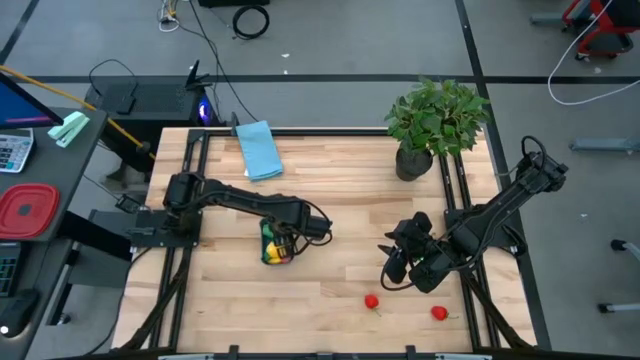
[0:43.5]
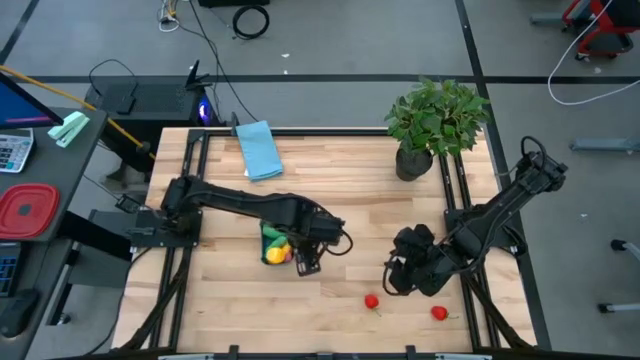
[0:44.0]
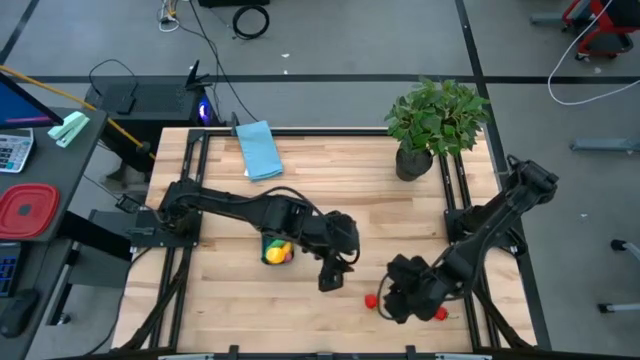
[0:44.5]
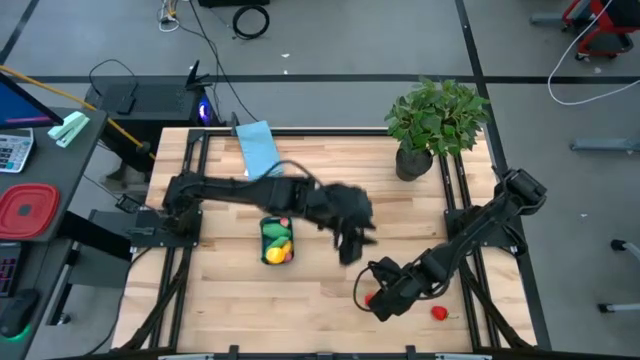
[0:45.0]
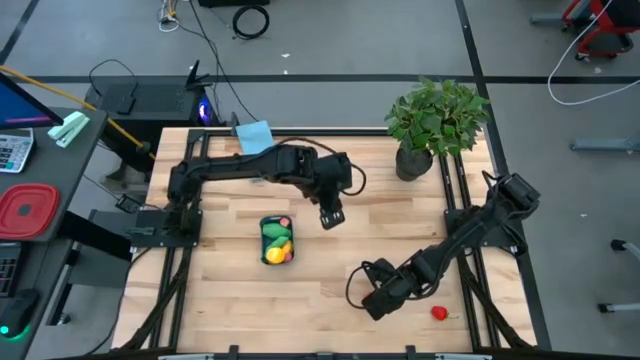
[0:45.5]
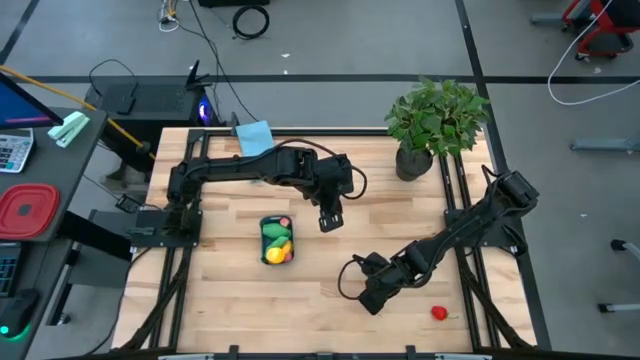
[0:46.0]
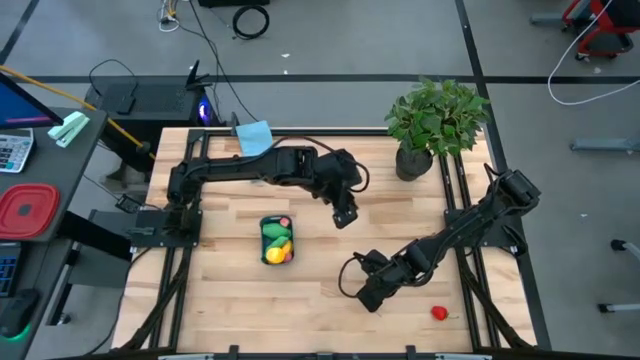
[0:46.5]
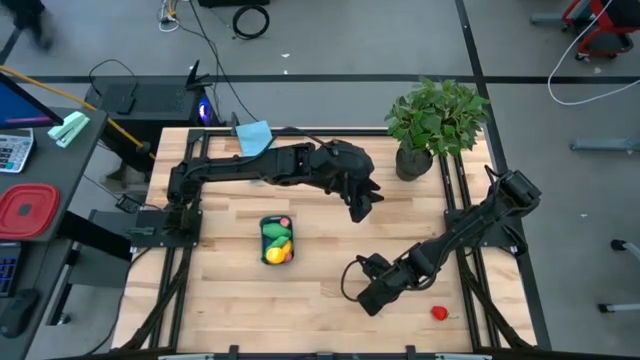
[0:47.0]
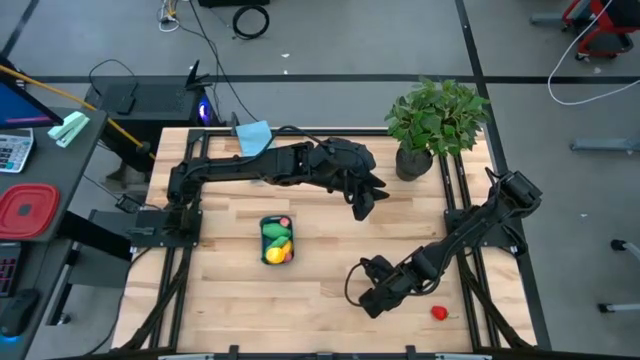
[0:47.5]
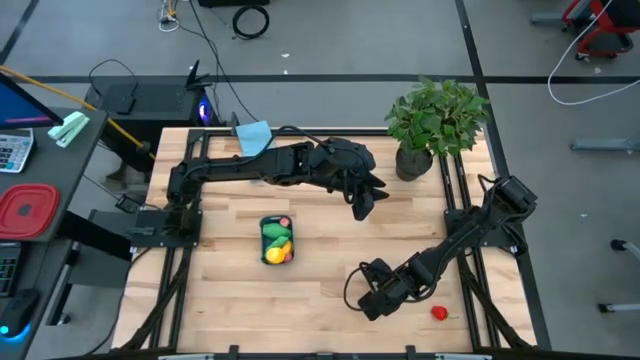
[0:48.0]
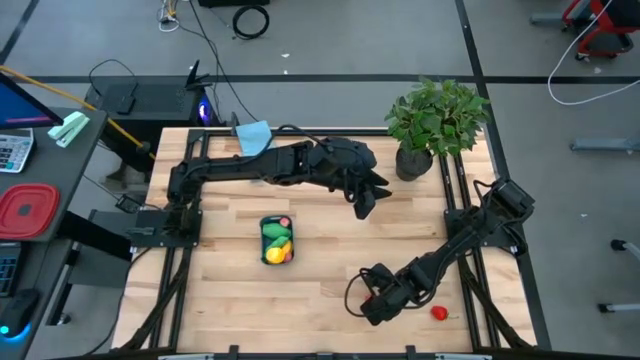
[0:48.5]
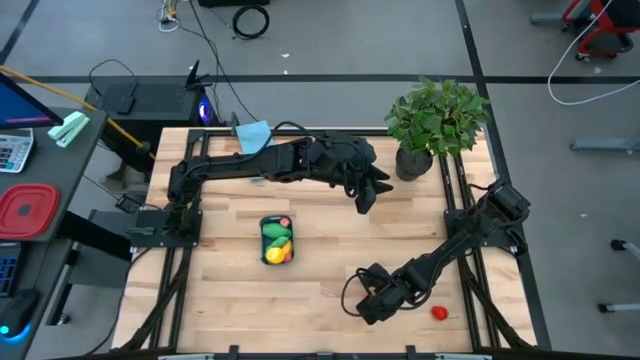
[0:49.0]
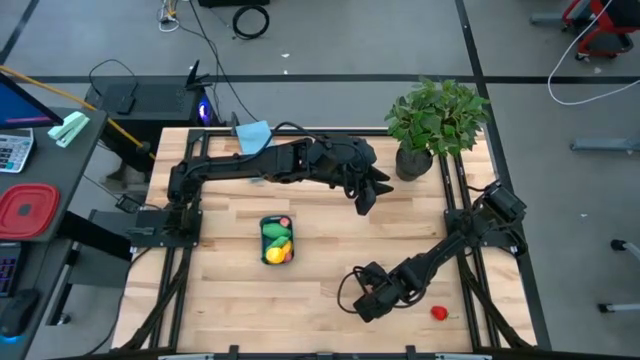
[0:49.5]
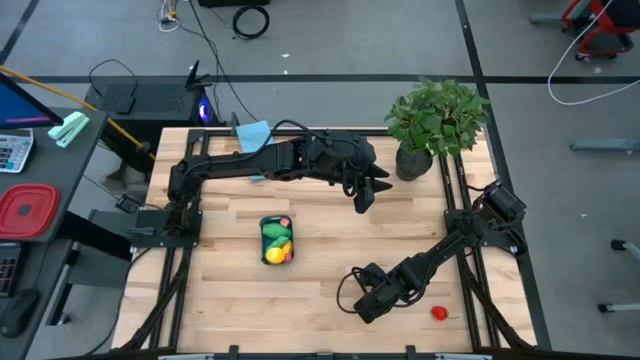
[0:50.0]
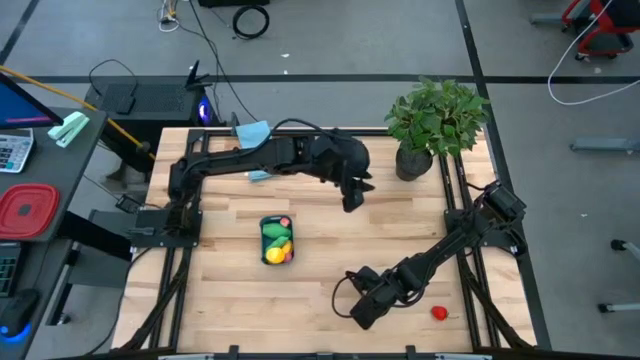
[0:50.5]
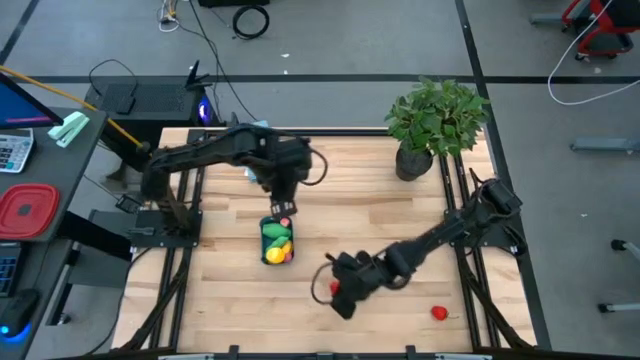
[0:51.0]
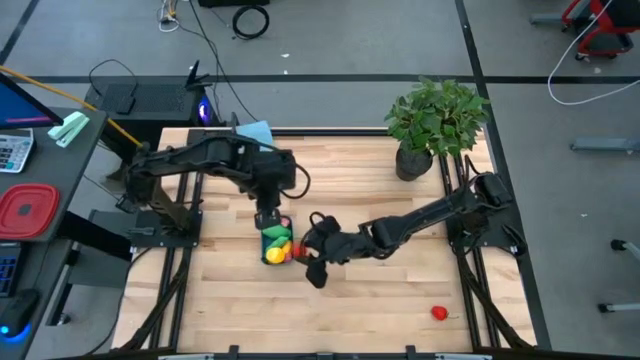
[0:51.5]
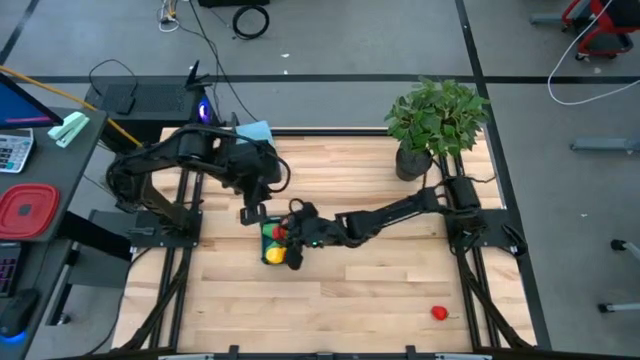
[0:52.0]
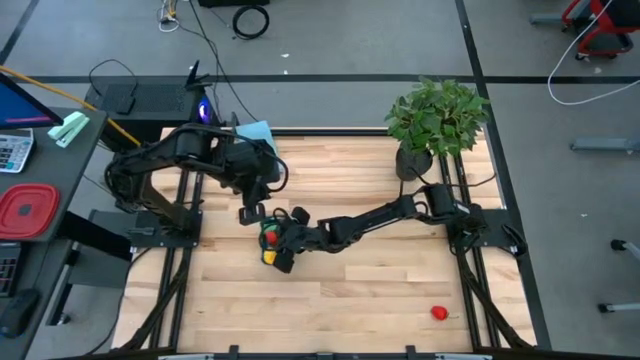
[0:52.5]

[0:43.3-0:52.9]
Task: Pick and placing Produce into tupperware
Put the left strawberry into the blue bin

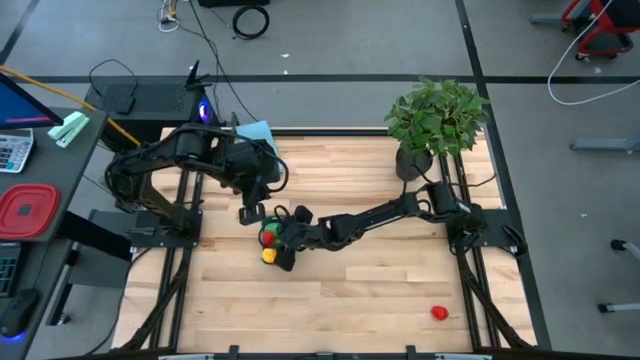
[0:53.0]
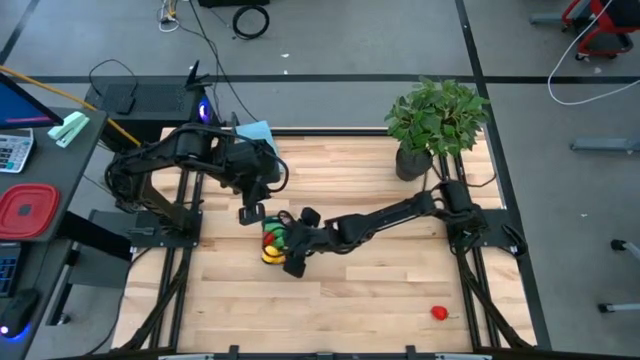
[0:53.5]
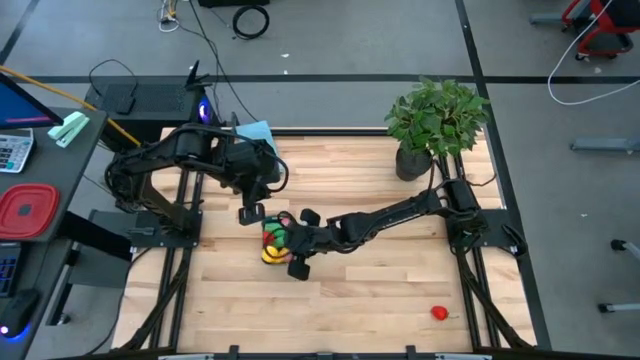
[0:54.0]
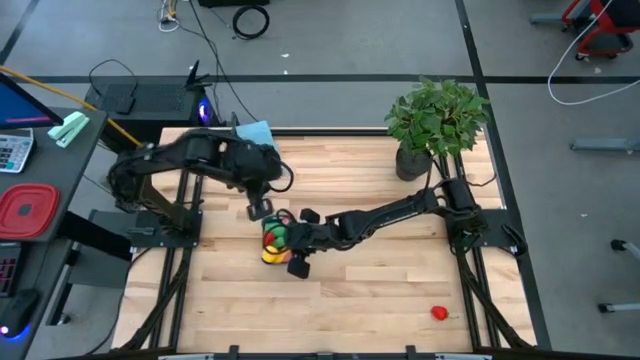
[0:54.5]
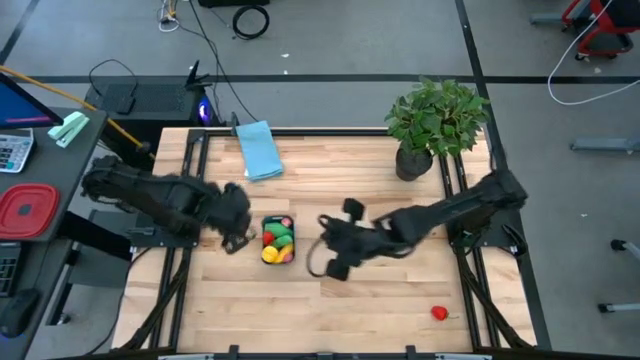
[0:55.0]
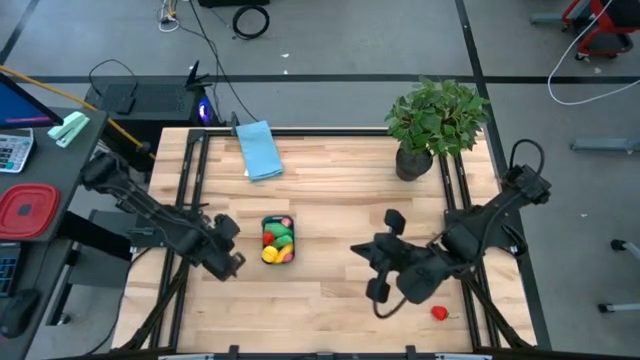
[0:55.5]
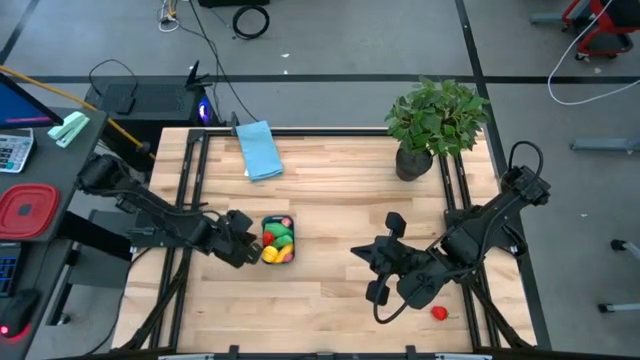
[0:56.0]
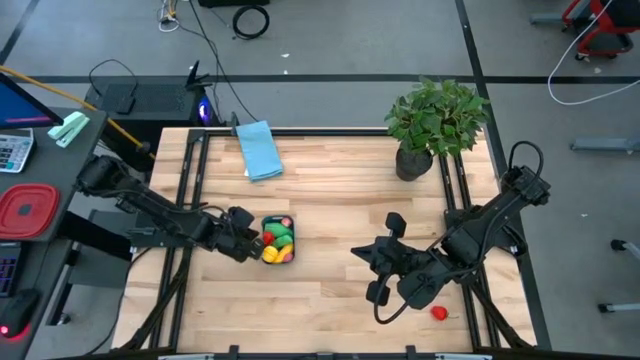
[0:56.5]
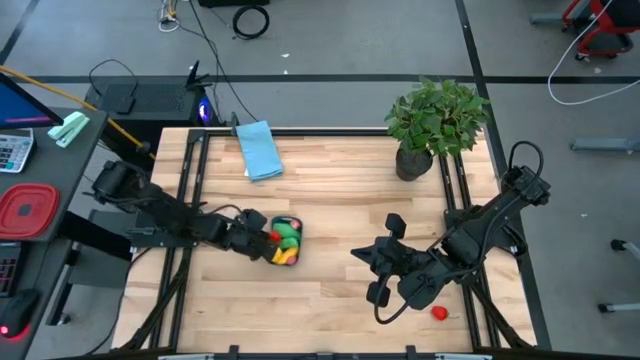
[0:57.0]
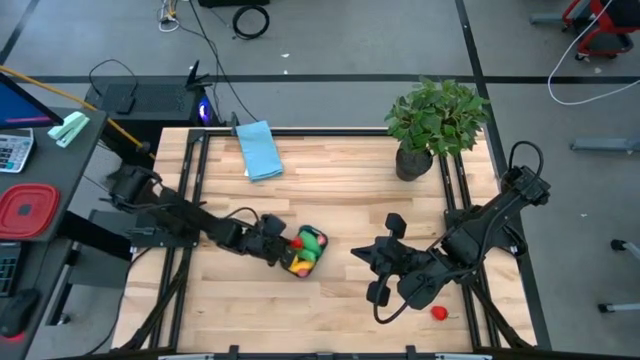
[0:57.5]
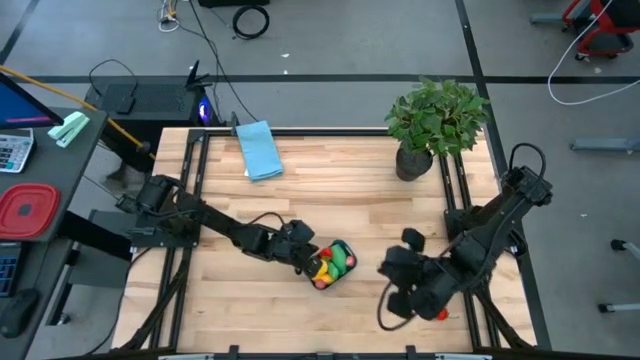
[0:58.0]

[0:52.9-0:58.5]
Move the blue bin to the center of the table

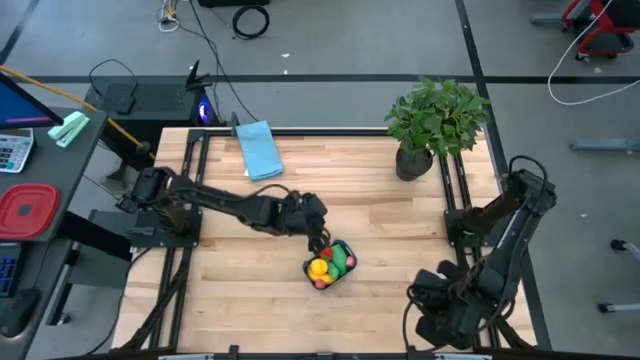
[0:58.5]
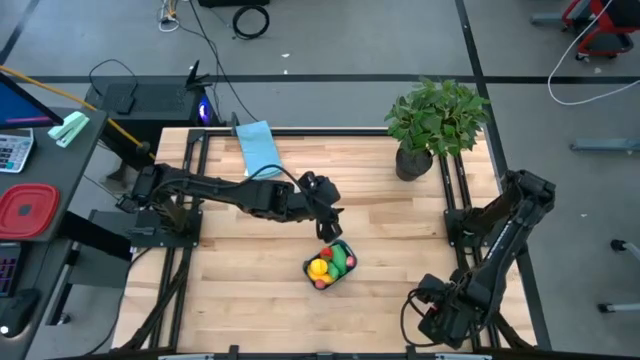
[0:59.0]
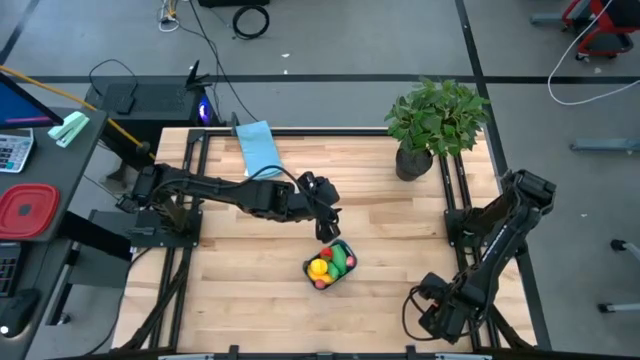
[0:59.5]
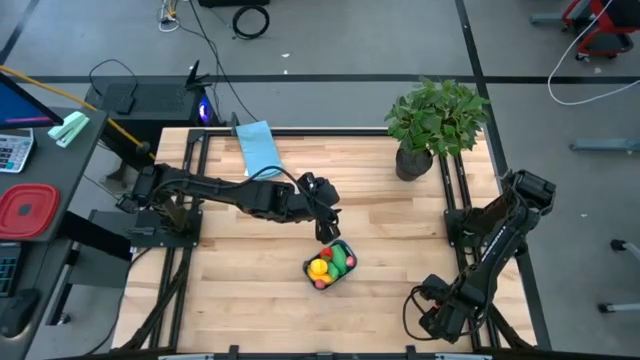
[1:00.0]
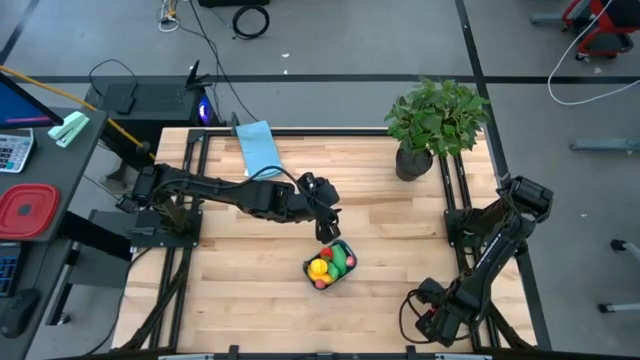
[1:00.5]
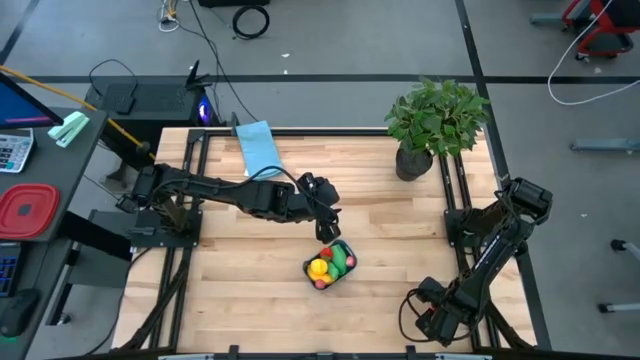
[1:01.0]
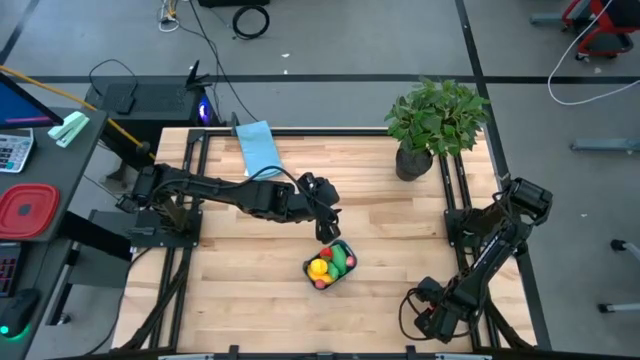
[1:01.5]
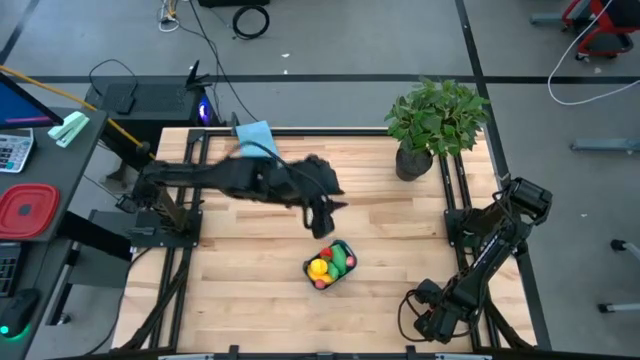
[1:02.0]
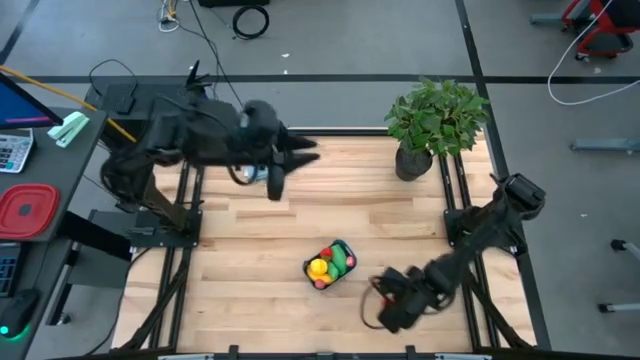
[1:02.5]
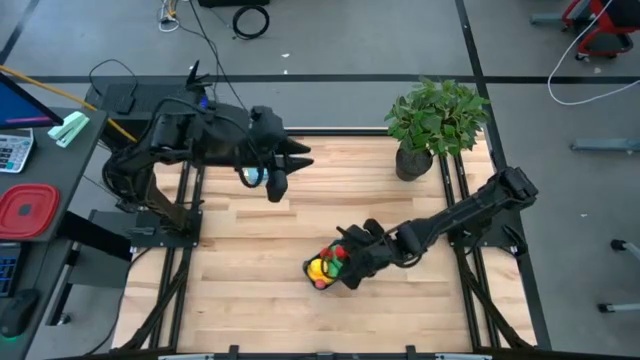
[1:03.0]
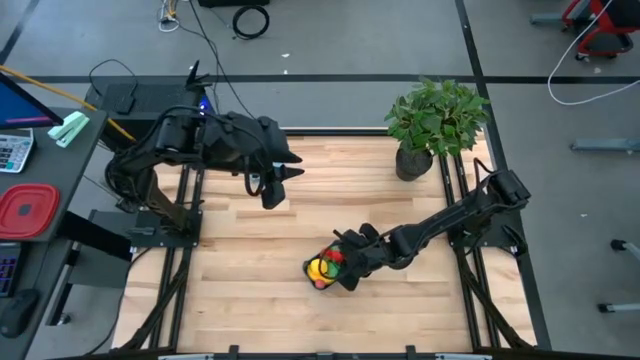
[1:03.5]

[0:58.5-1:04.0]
Put the strawberry into the blue bin

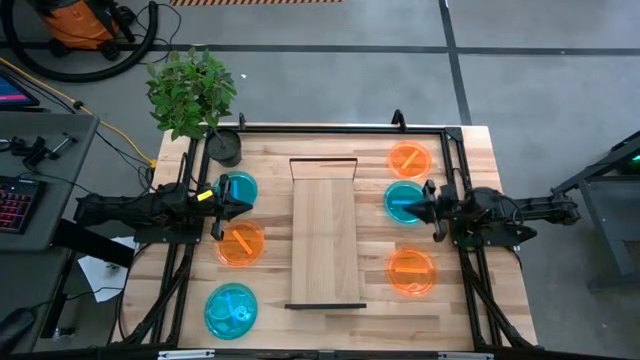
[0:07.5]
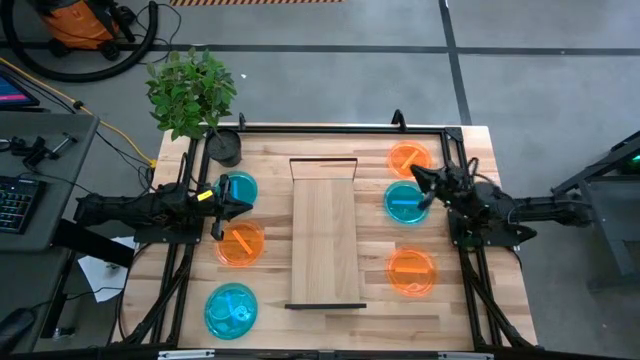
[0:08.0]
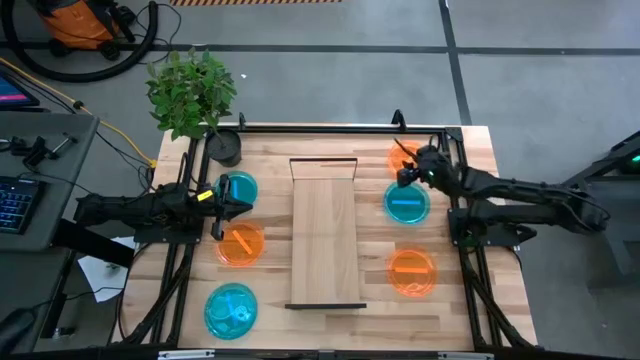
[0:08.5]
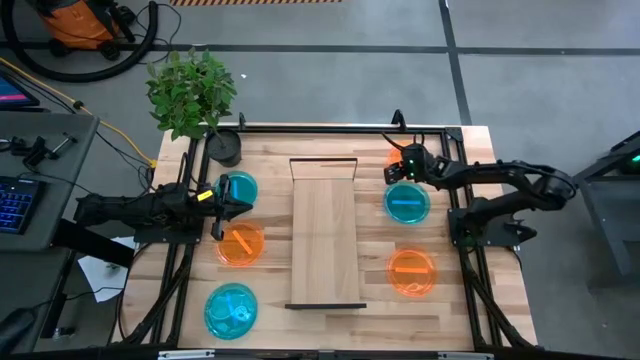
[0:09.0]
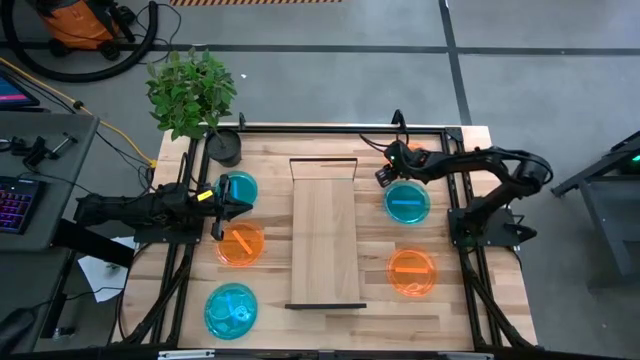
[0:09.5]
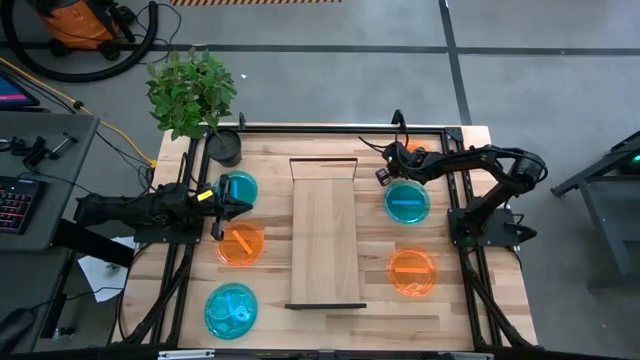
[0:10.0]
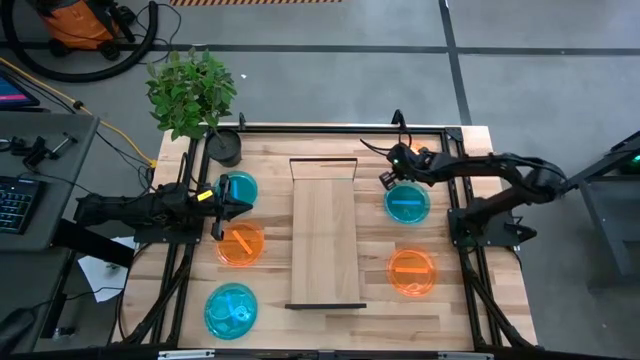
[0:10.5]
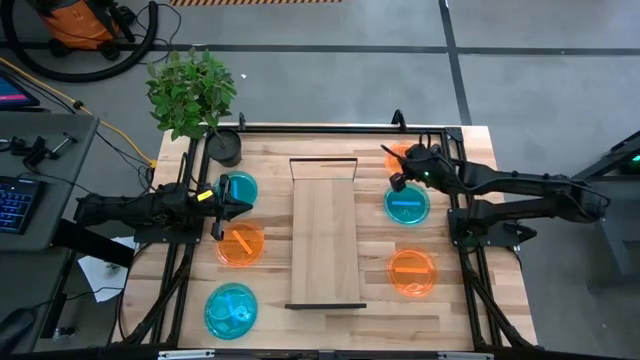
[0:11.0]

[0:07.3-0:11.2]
Task: Place and stack plates onto a shelf
Put the top right orange plate on the shelf
